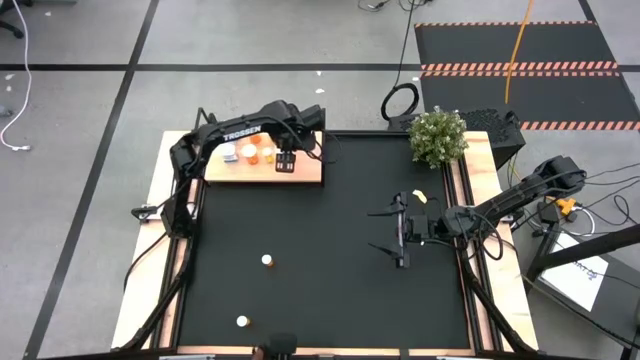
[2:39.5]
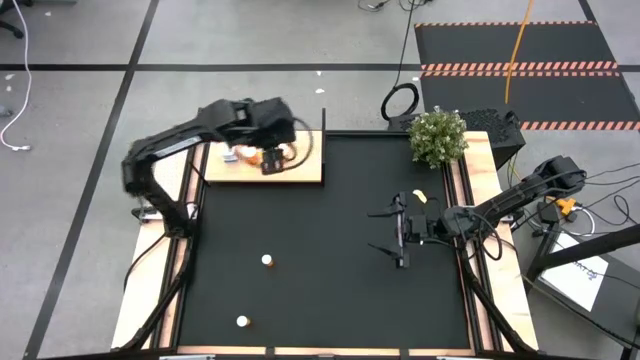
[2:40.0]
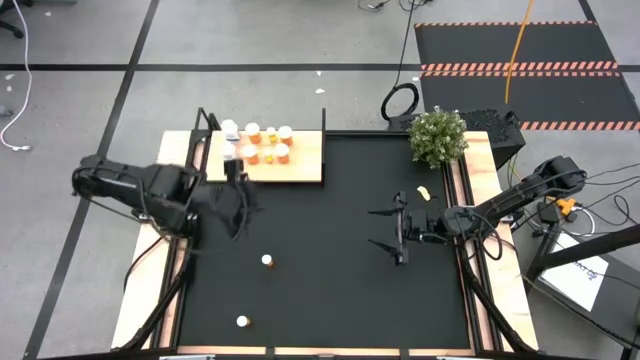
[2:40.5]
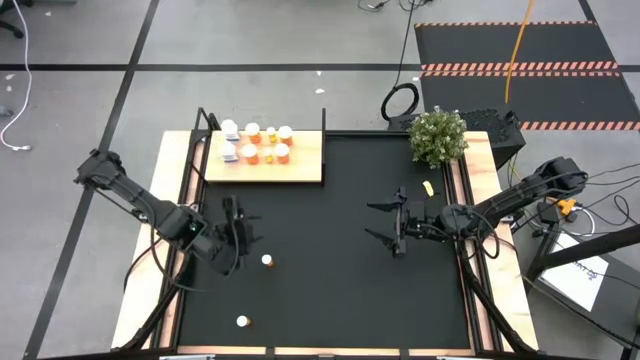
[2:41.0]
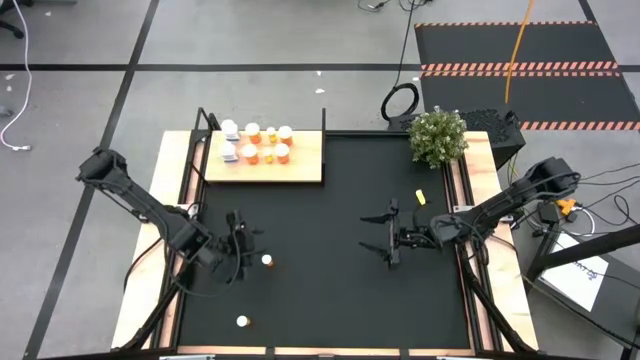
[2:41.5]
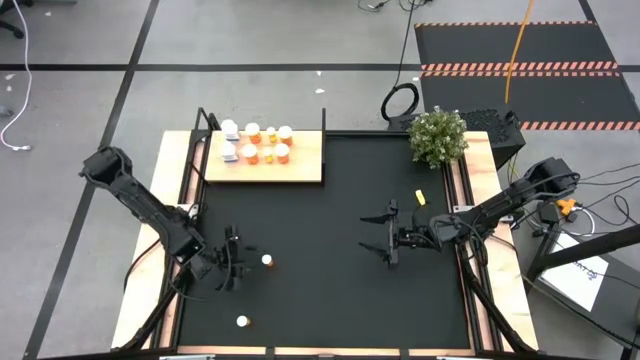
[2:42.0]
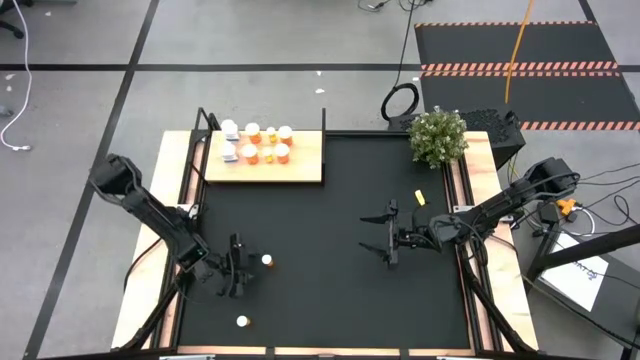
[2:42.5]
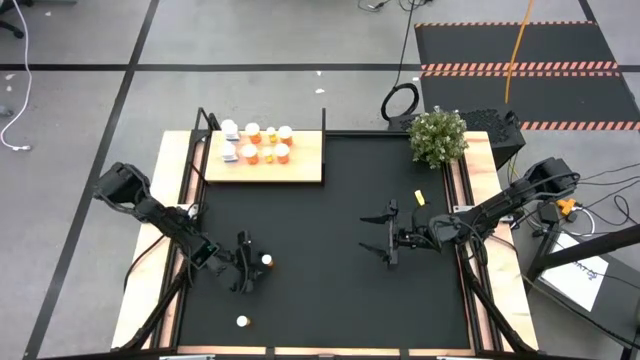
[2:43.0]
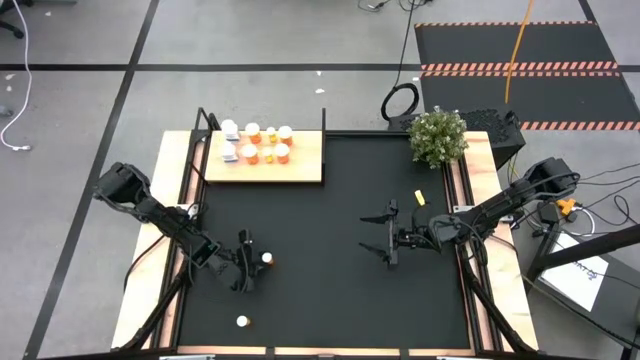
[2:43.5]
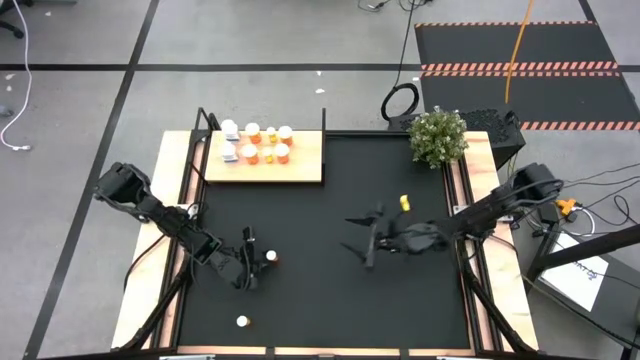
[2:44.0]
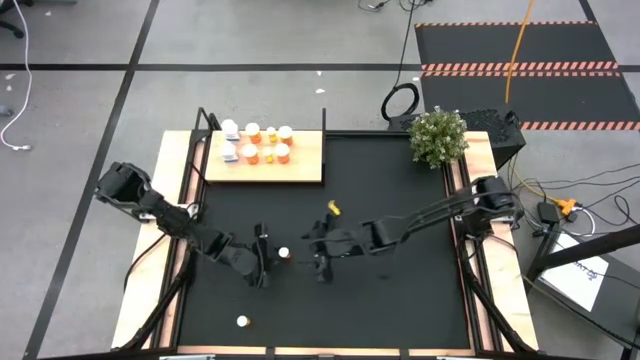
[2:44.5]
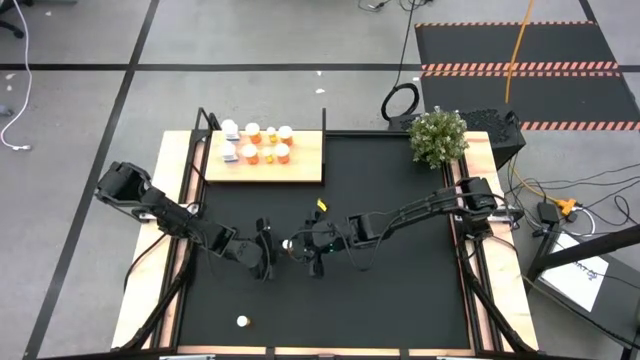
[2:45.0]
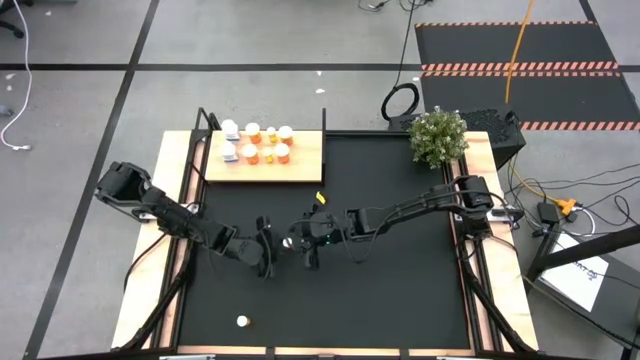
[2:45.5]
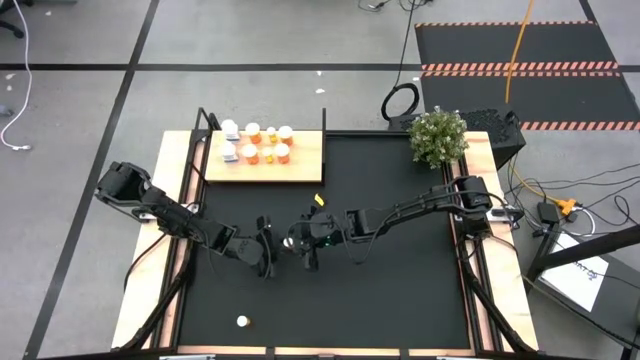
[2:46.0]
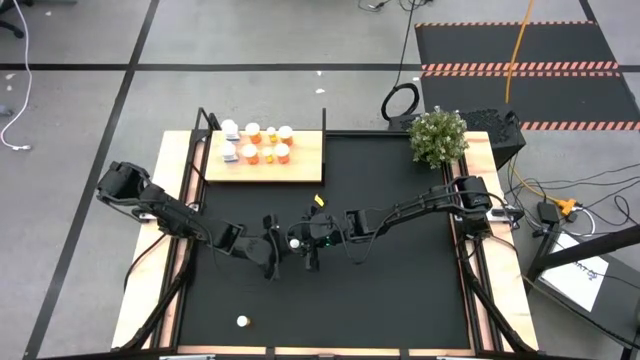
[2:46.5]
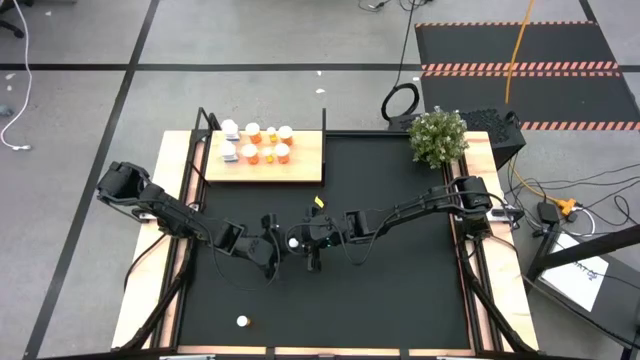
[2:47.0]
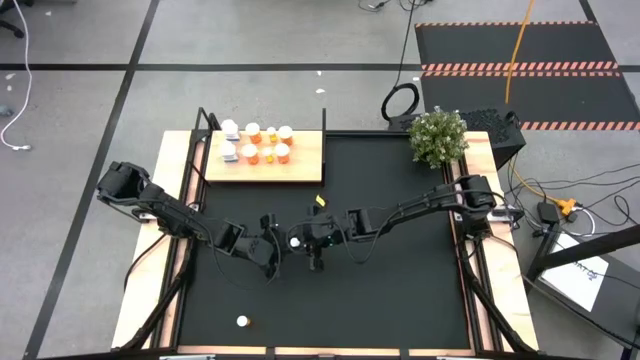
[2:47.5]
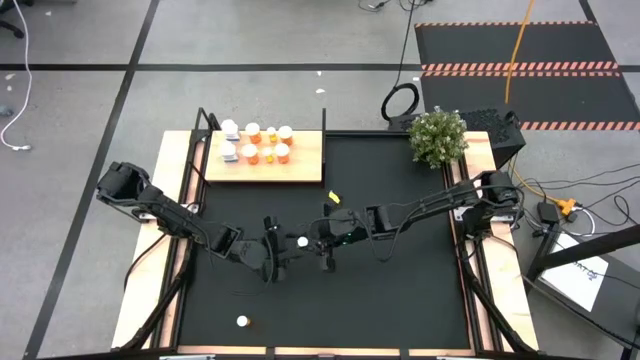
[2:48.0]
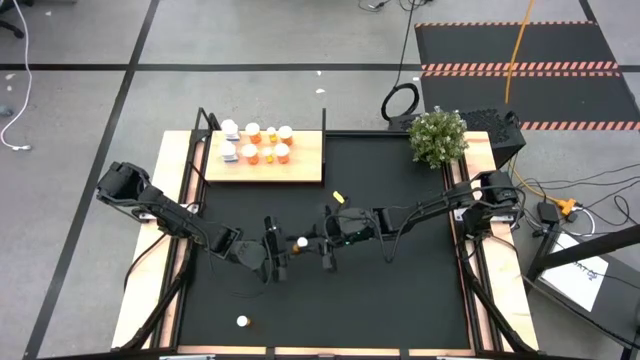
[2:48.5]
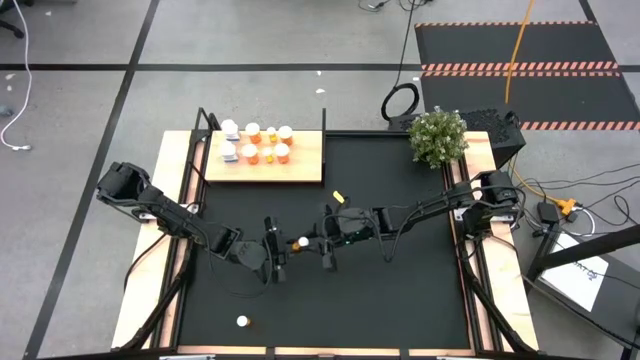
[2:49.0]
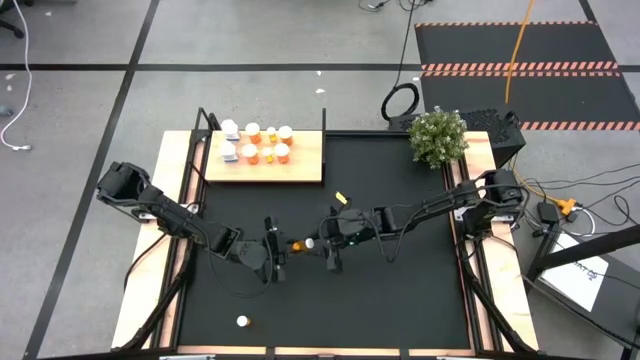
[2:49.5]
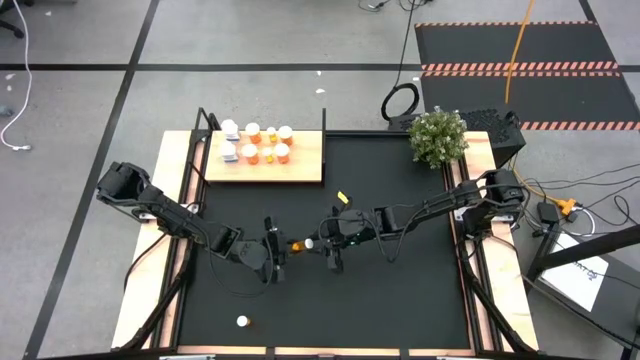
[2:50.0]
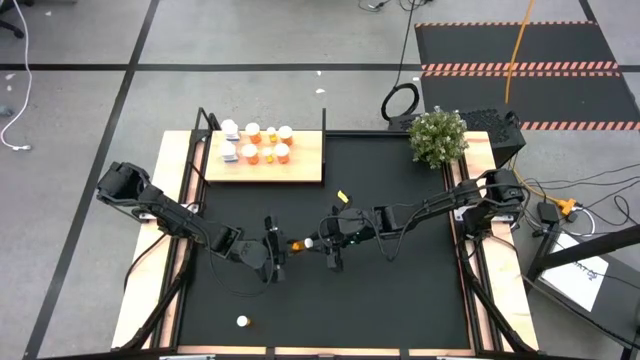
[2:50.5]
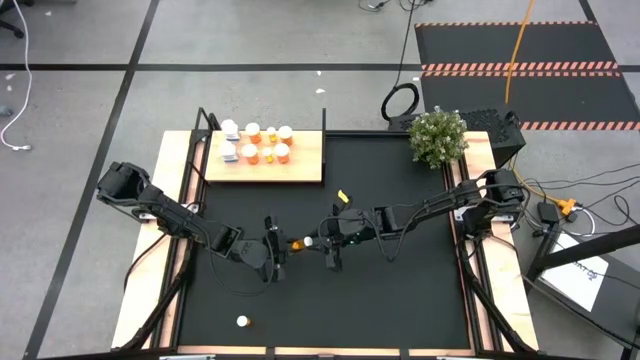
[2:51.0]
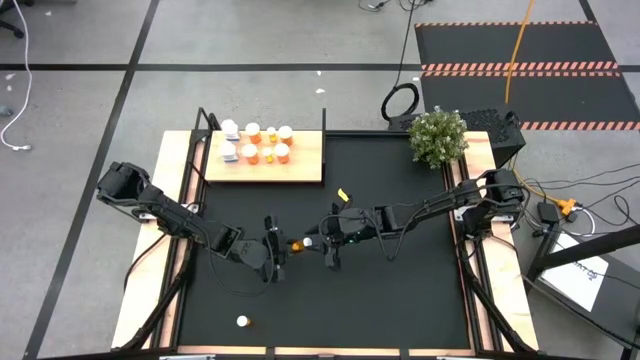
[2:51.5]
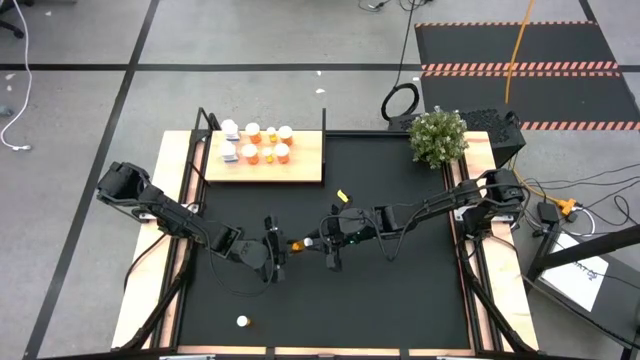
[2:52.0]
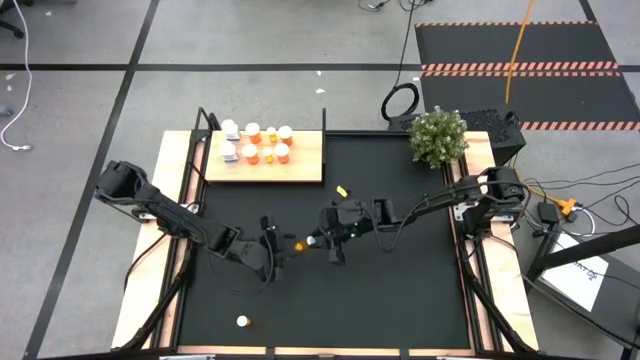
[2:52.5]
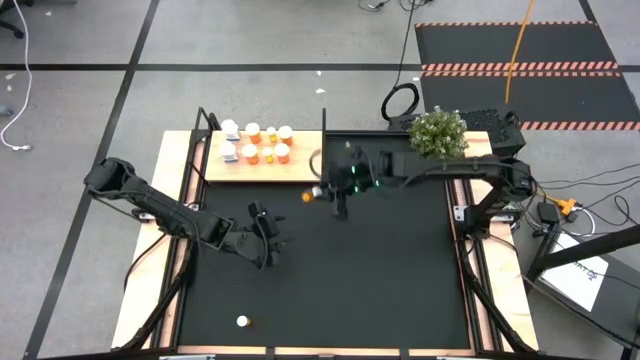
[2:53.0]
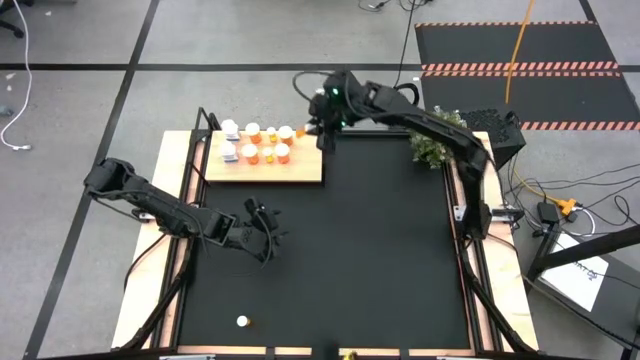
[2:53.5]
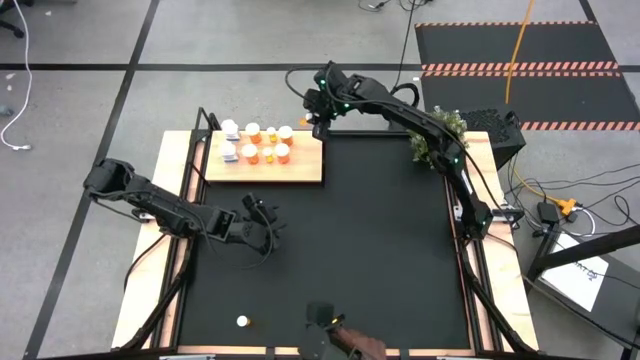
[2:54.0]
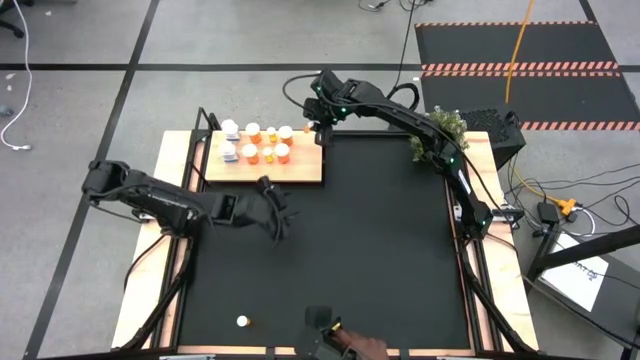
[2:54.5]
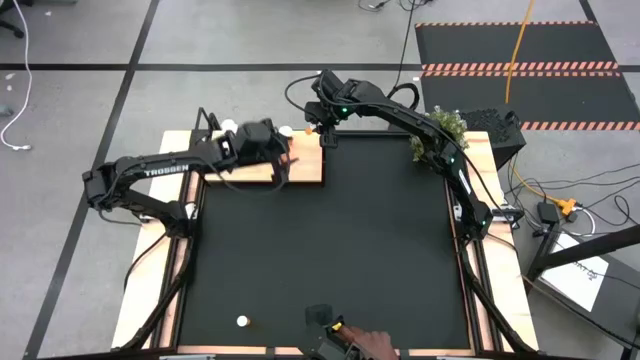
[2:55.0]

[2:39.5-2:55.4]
Task: Pick and place medicine bottles onto shelf by color
Put the small orange pill bottle on the shelf

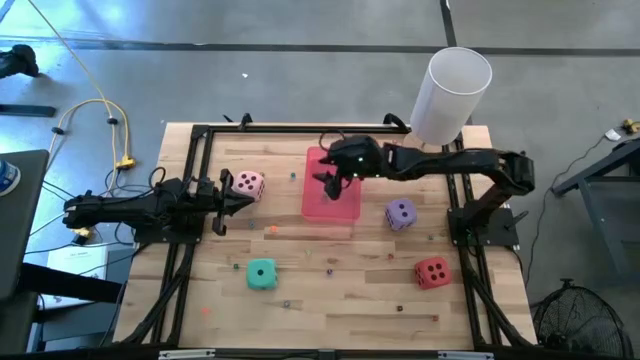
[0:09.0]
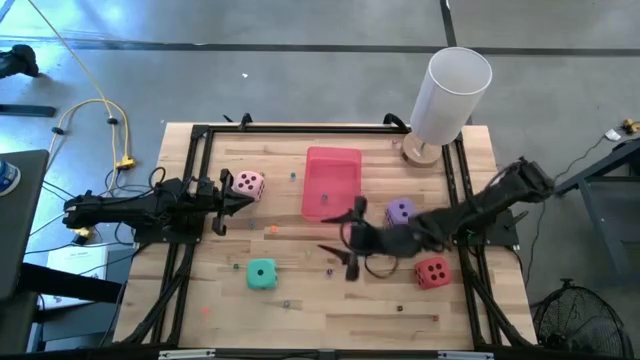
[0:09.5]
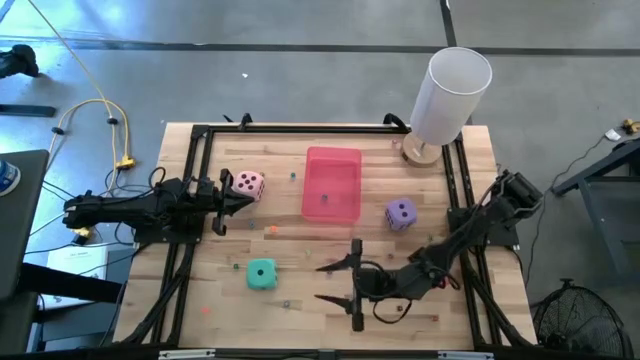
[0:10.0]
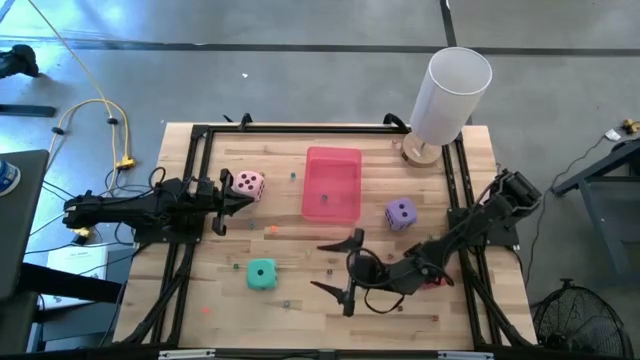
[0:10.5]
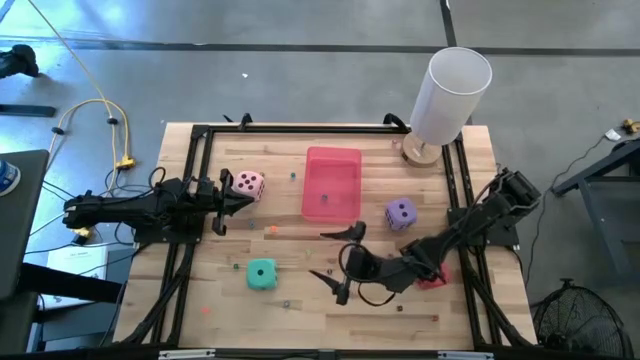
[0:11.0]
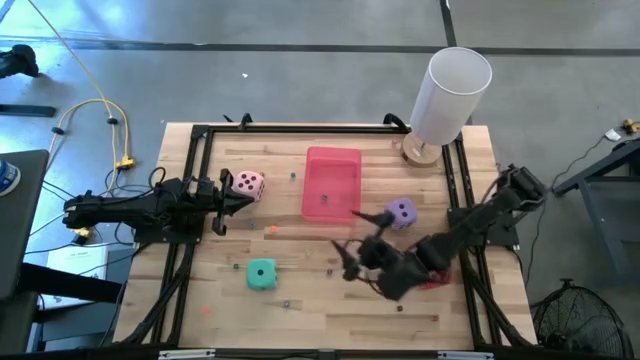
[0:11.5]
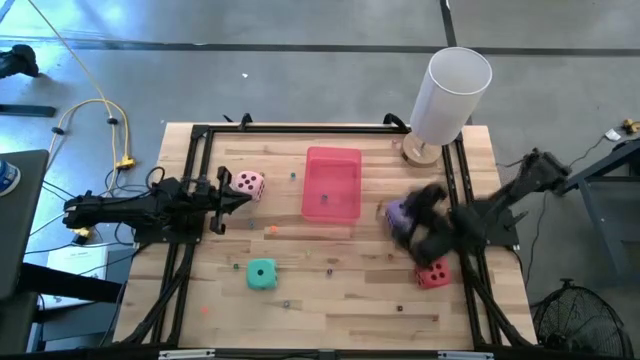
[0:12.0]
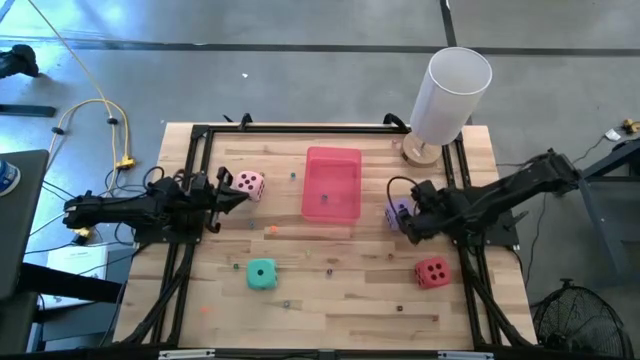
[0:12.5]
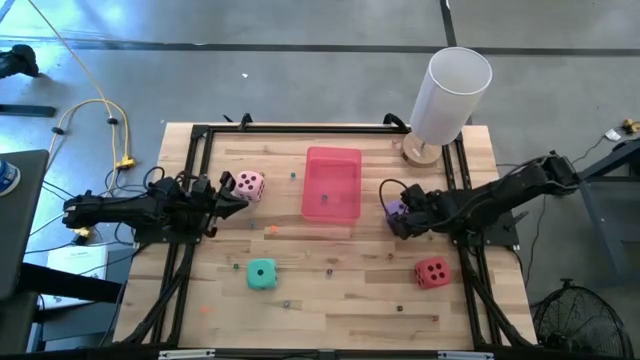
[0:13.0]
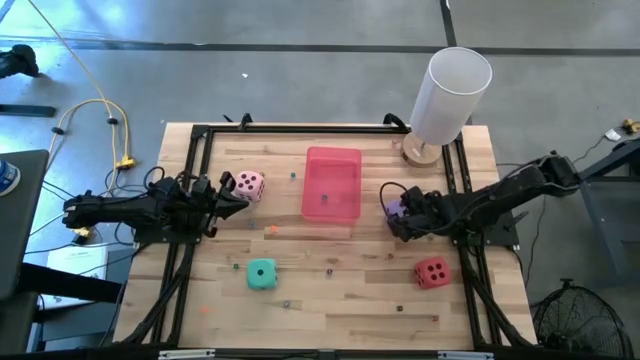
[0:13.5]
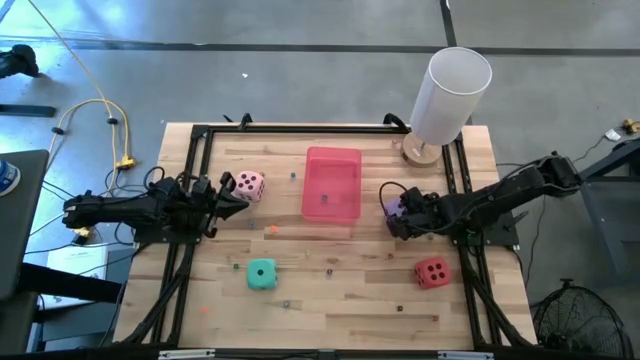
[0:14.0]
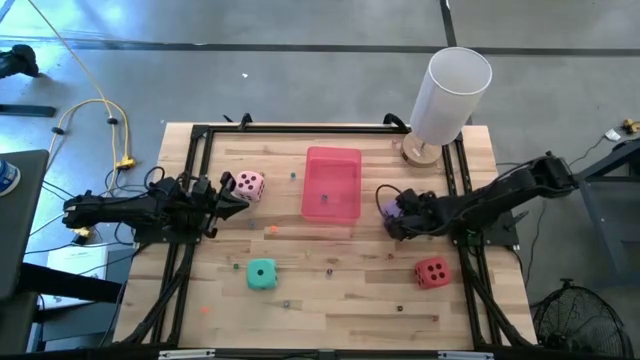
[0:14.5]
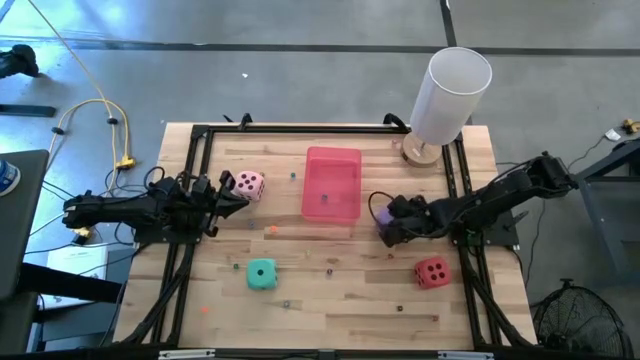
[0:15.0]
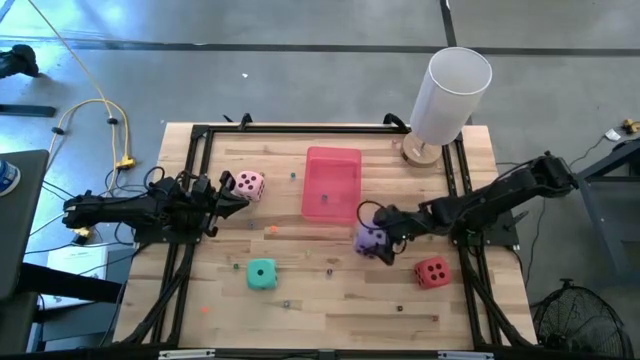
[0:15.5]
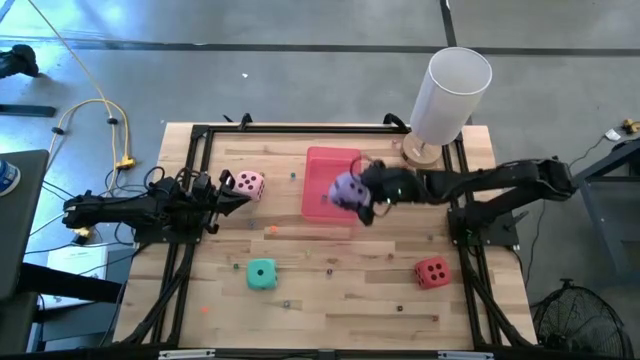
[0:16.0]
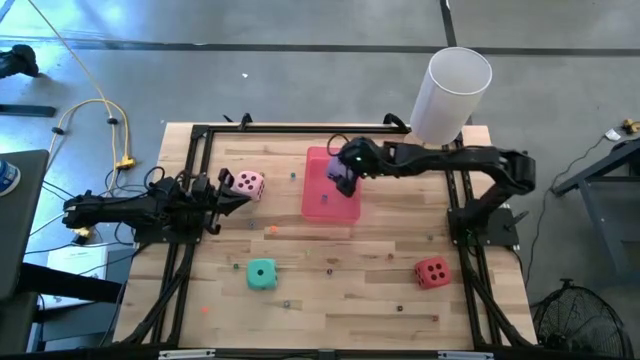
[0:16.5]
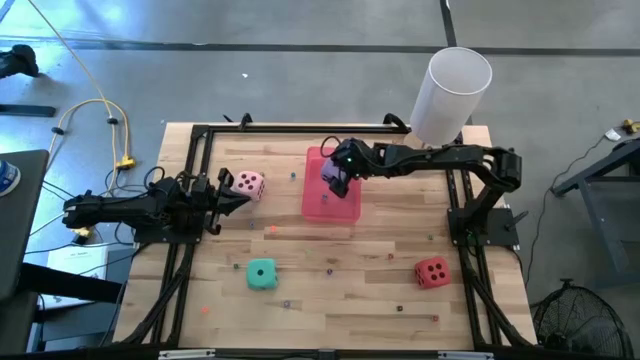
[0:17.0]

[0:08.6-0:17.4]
Task: Pick & Place Dice
Put the large purple die into the red bin
